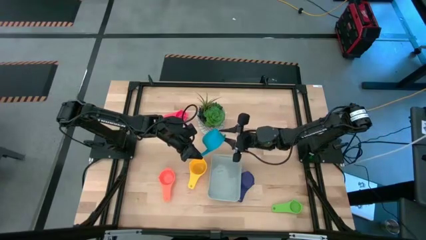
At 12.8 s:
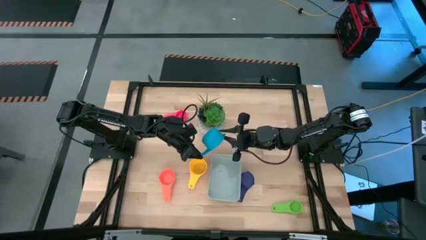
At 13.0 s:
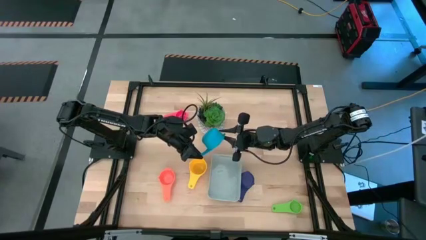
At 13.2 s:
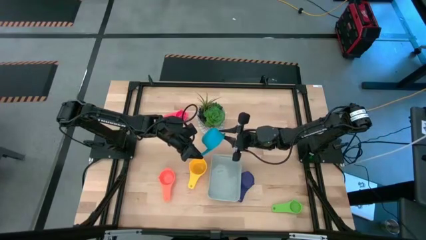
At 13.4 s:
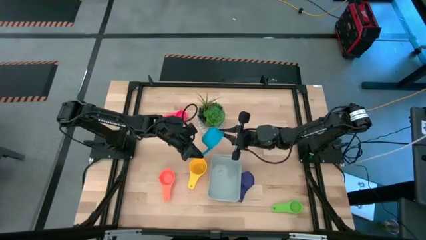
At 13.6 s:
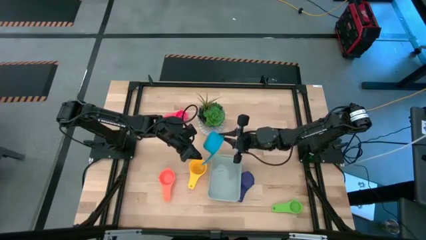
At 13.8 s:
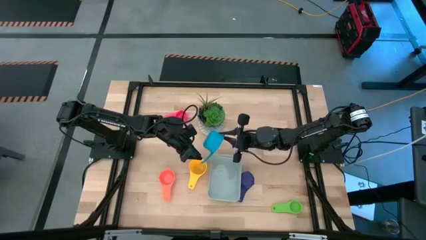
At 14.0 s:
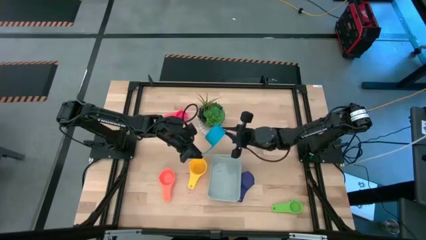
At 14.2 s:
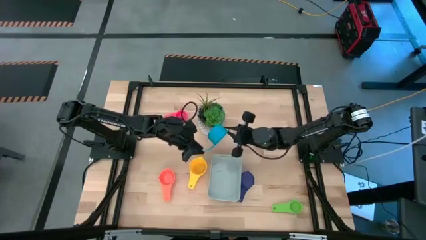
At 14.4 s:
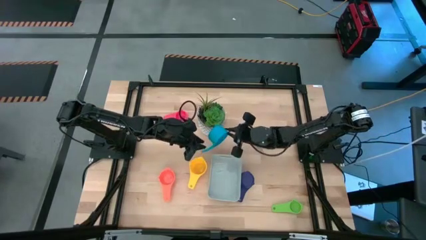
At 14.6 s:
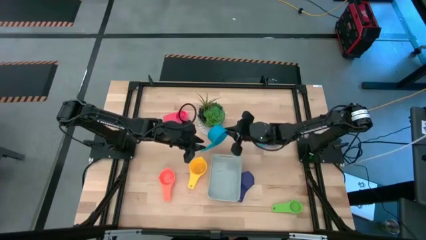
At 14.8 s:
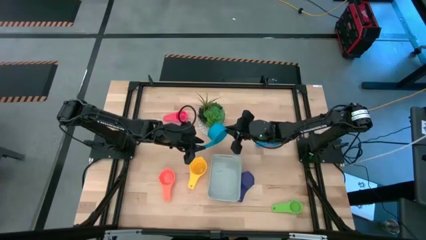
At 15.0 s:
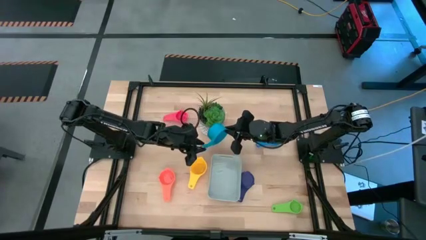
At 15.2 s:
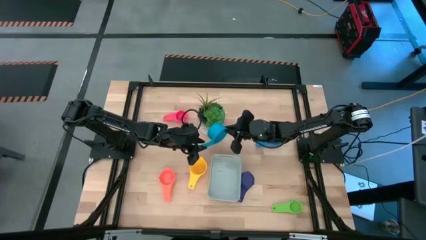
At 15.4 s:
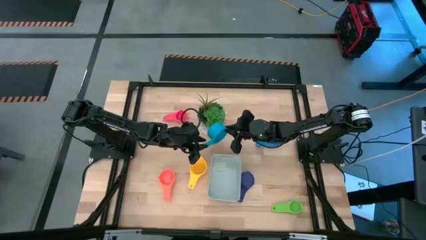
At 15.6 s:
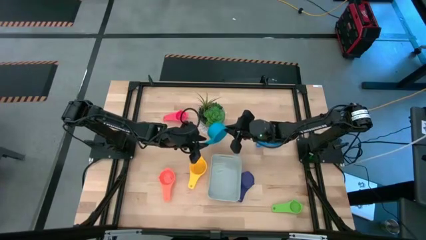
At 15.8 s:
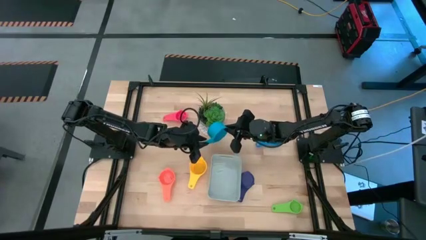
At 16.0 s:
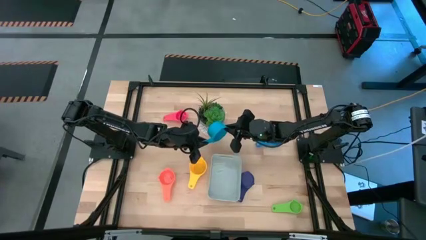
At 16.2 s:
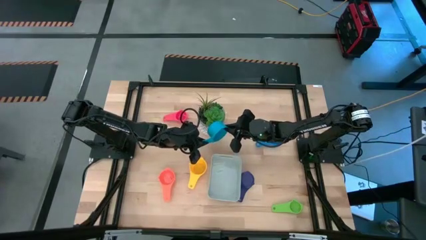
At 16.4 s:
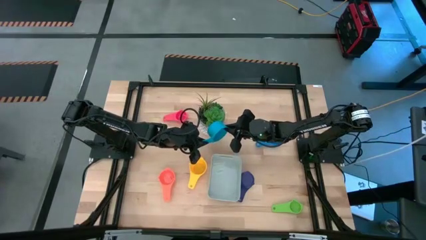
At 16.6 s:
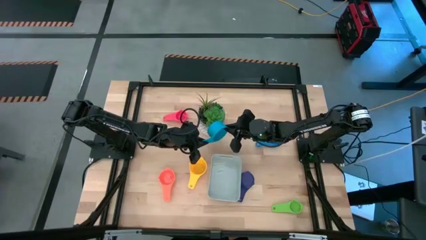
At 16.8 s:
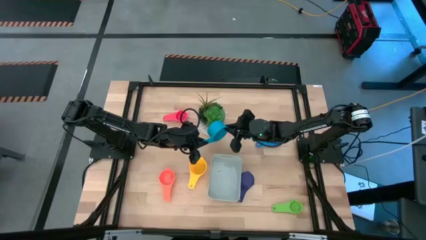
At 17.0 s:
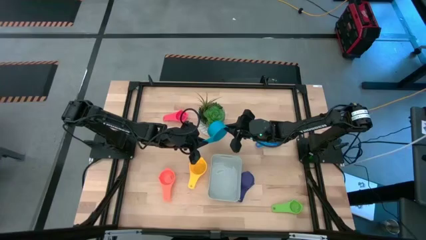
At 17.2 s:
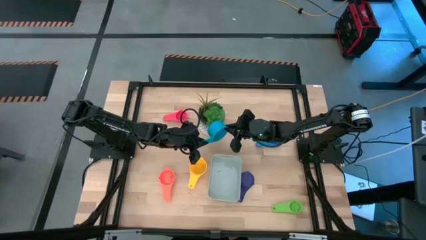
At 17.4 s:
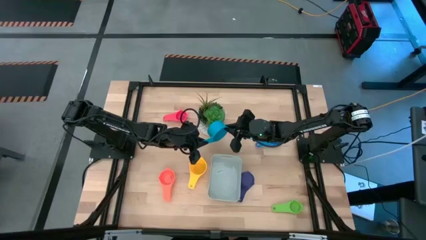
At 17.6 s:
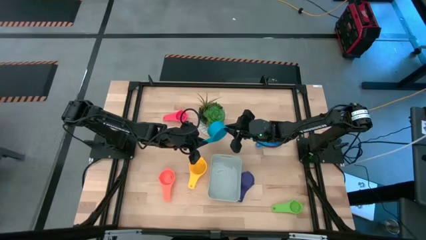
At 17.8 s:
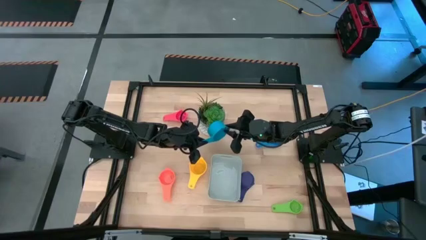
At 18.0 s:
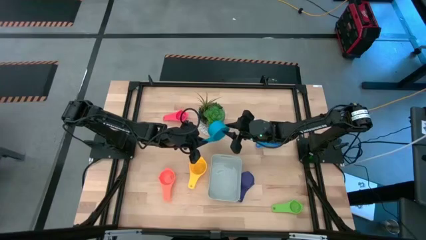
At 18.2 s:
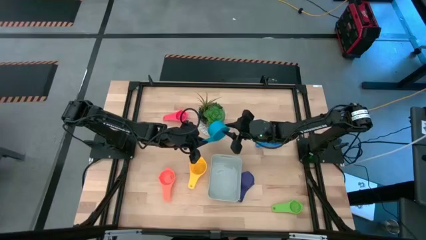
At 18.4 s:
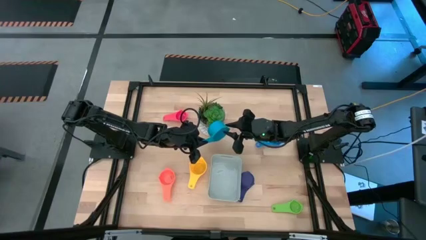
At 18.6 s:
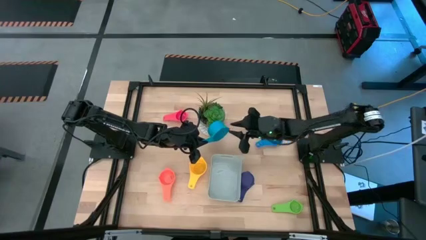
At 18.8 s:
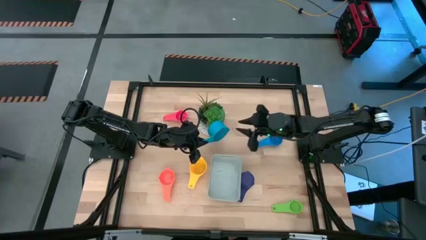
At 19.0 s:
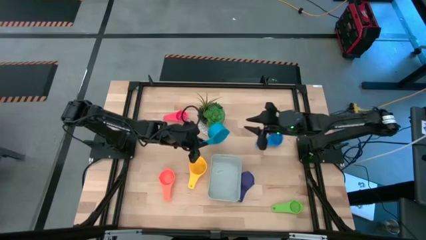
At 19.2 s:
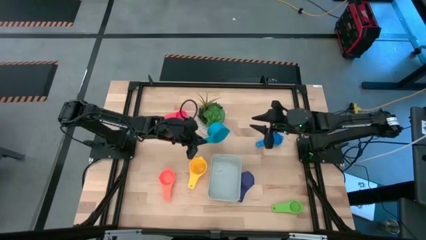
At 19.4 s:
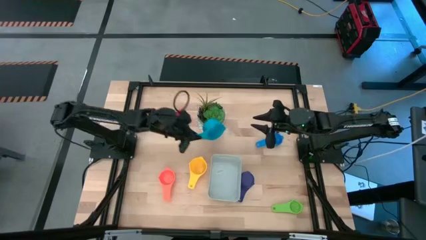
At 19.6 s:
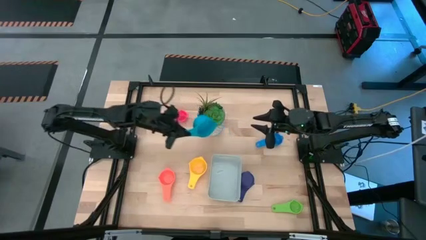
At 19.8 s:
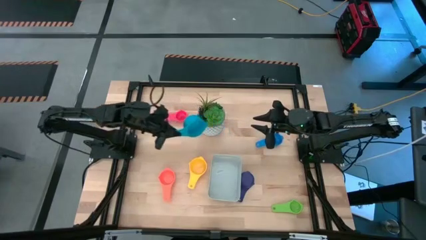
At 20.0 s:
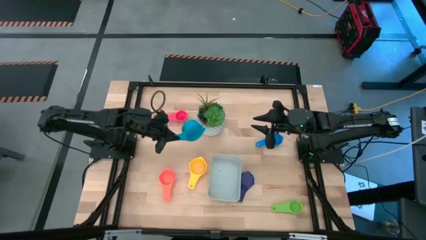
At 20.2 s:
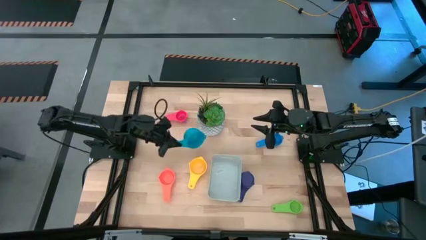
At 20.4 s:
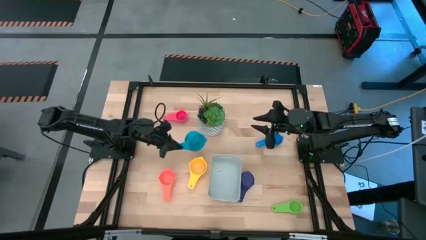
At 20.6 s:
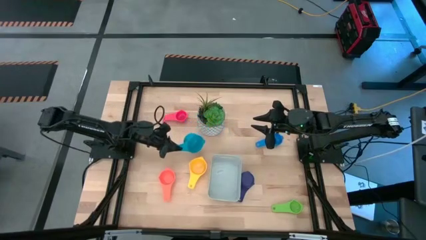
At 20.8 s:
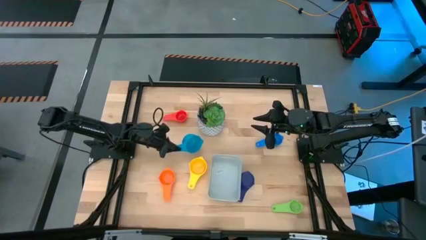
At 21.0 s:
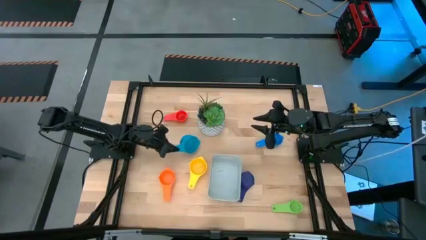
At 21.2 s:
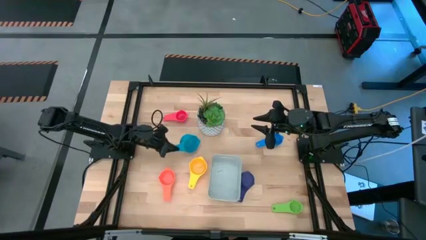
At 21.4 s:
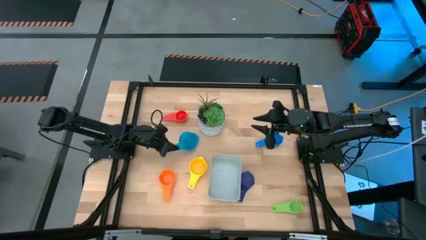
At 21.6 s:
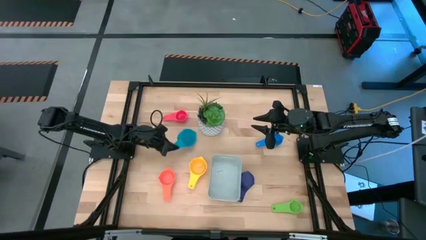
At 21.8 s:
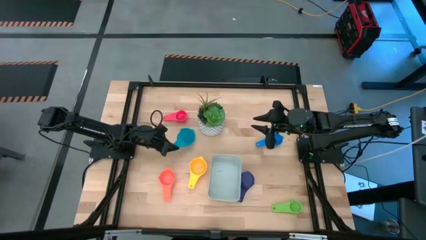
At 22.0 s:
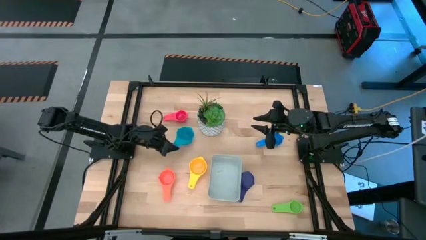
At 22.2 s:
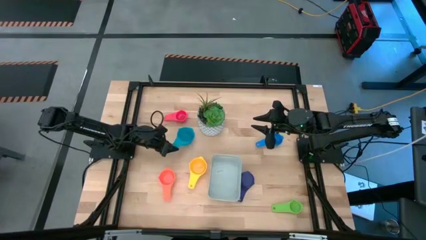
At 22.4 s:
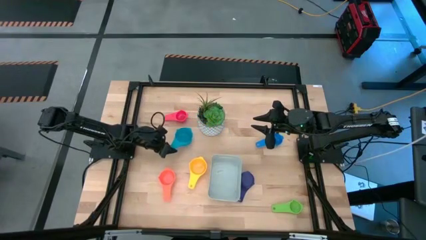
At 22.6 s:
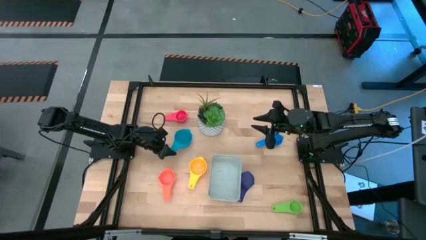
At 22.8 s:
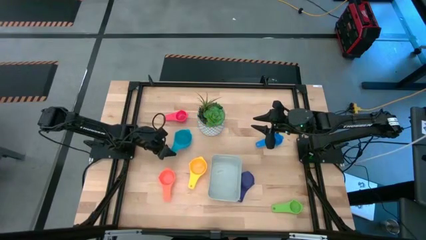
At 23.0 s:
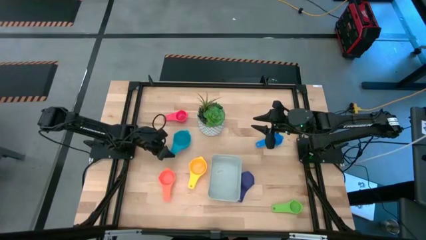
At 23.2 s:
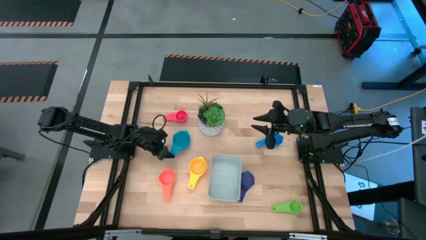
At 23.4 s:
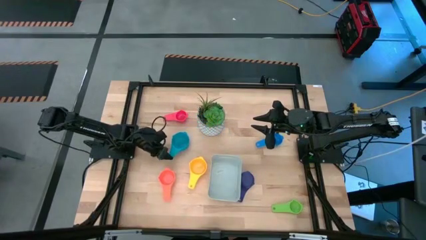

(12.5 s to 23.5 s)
Task: Nest measuring cups in basket
Adjust the light blue measuring cup
